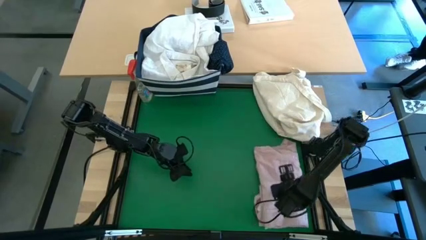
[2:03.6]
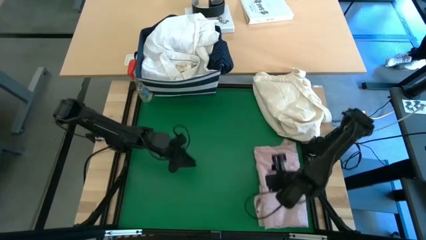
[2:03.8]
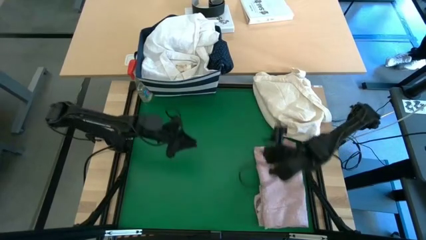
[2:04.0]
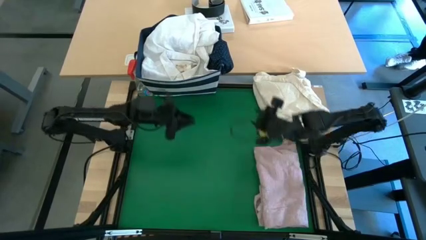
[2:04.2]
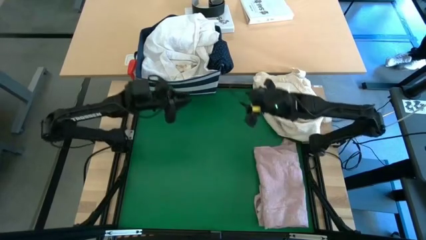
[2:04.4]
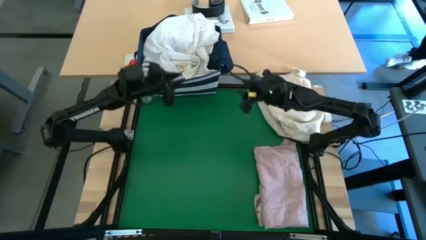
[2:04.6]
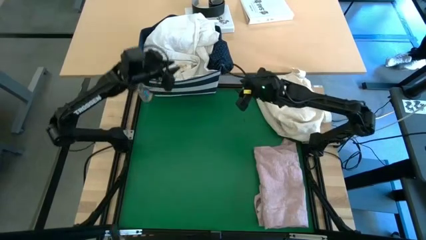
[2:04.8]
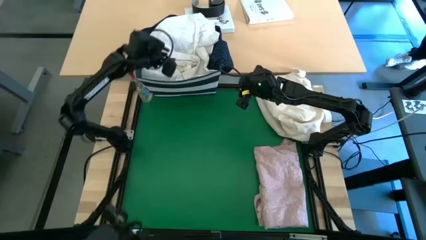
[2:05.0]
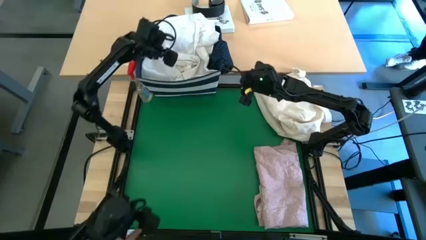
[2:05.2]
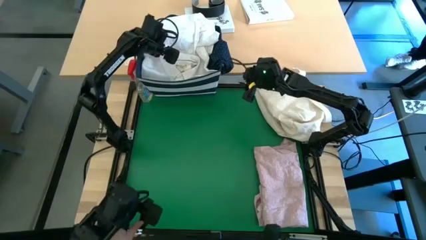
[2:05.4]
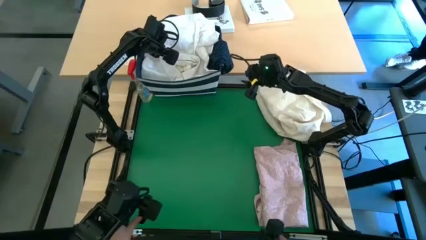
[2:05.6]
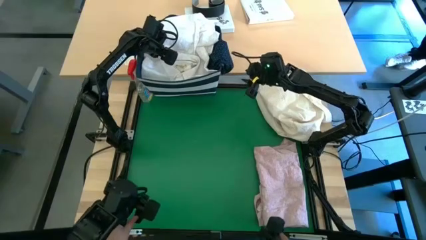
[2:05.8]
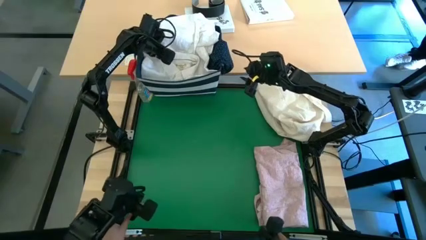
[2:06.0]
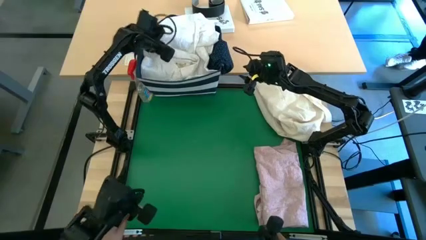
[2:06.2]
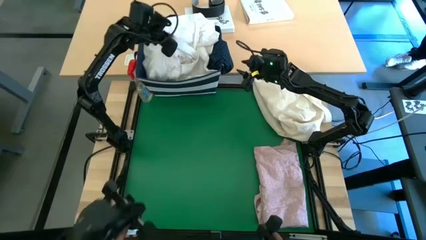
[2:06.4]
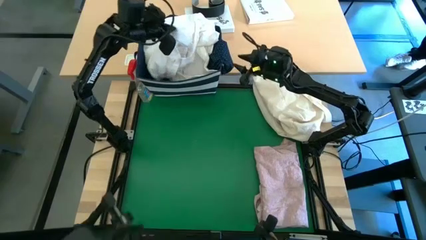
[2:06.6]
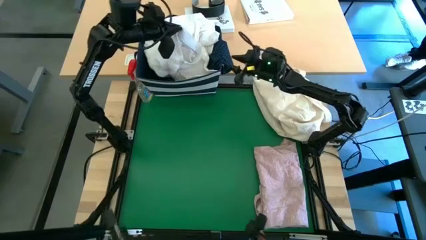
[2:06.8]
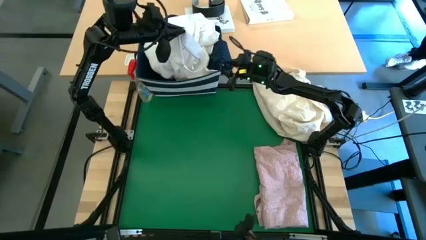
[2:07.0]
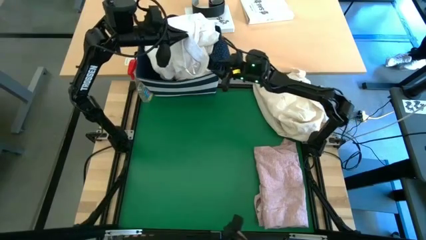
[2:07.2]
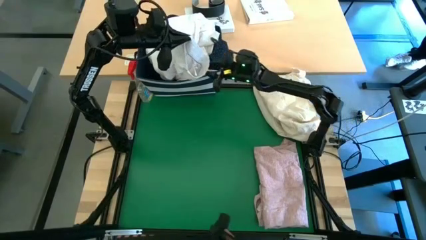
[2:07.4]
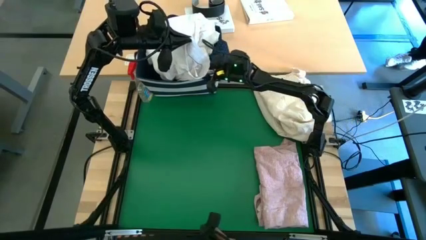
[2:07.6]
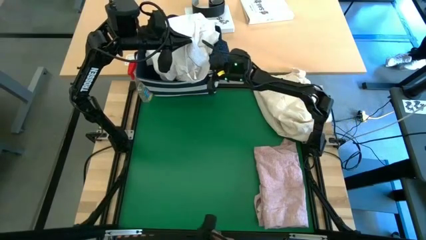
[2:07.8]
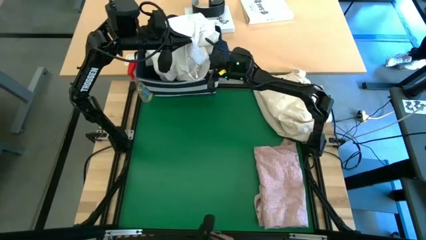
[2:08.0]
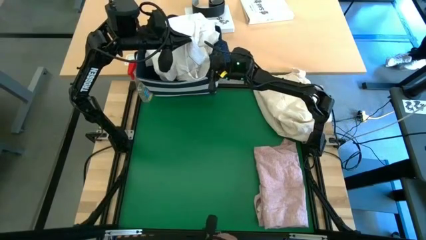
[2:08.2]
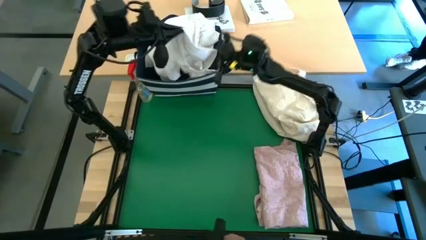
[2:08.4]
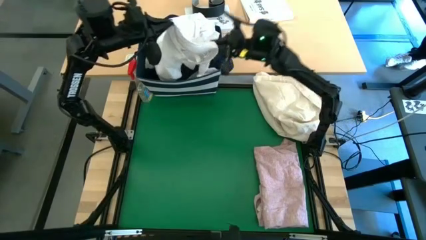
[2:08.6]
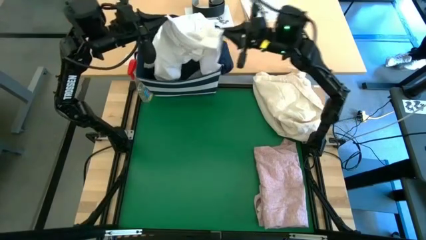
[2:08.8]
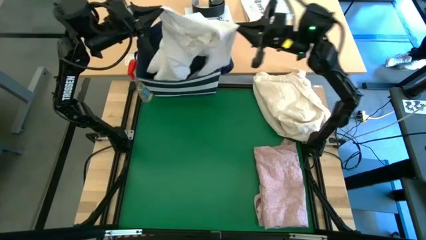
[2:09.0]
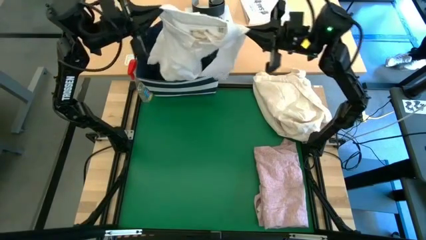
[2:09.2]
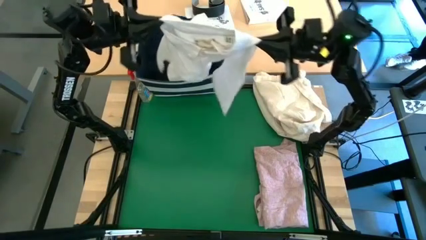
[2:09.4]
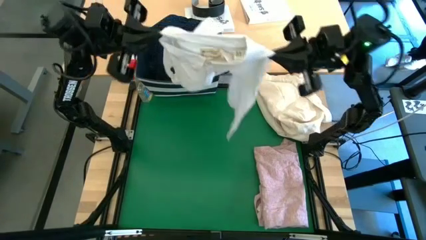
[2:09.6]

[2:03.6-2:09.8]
Task: Fold laundry
Remove the white polo shirt from the blue laundry bin

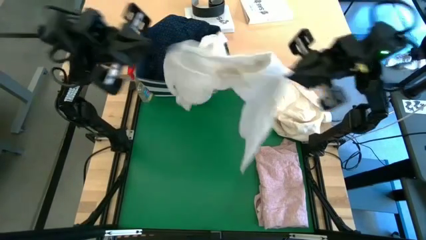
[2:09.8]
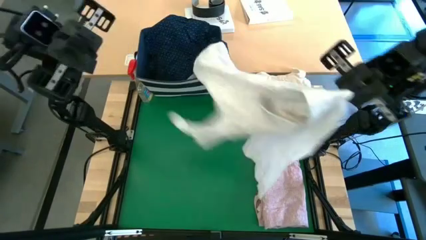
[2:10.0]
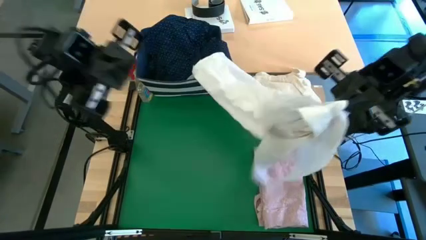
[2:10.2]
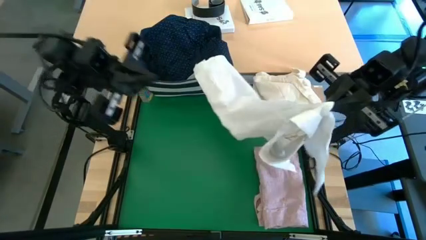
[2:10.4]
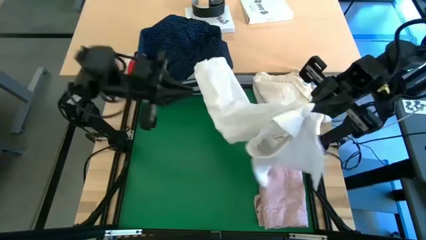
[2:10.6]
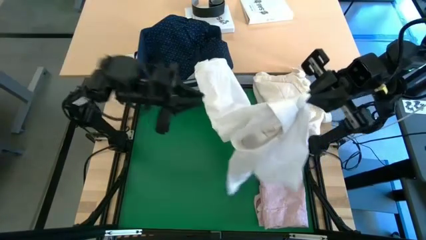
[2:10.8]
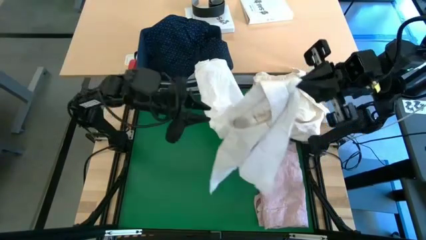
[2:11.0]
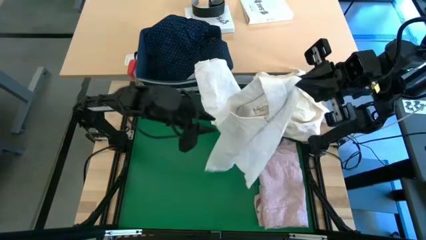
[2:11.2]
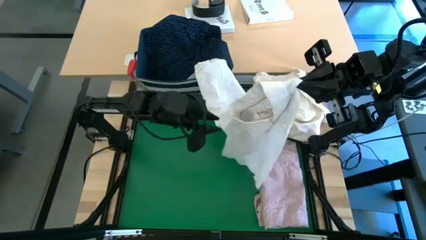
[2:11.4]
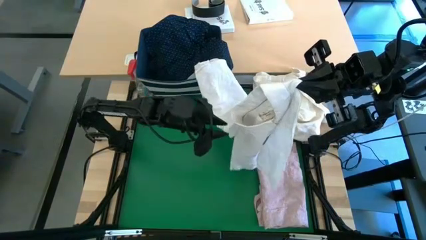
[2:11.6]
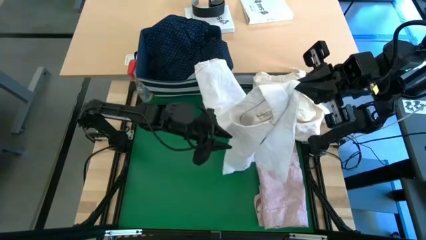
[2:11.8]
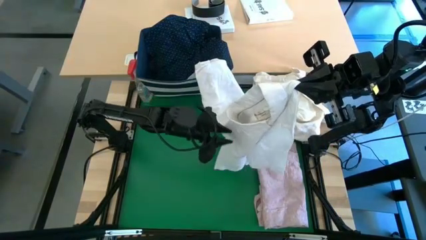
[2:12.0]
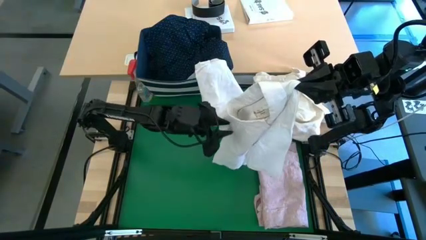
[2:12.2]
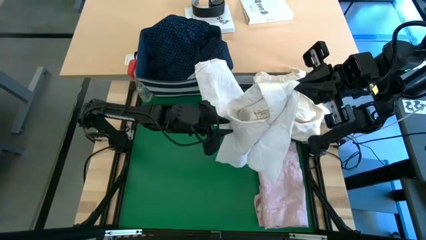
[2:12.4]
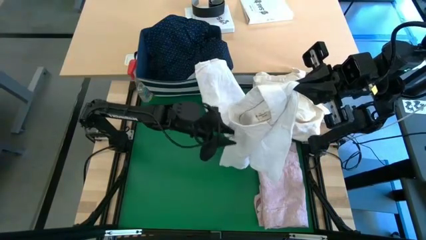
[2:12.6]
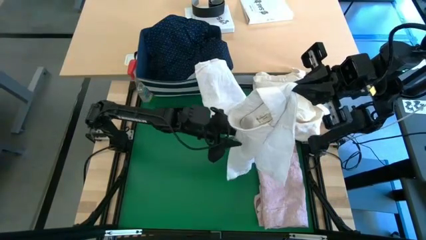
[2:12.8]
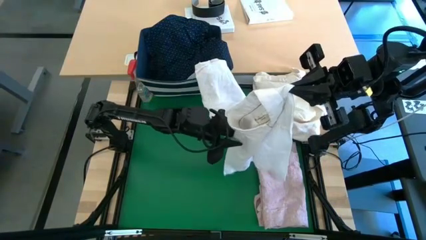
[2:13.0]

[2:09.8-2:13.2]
Remove the white polo shirt from the blue laundry bin

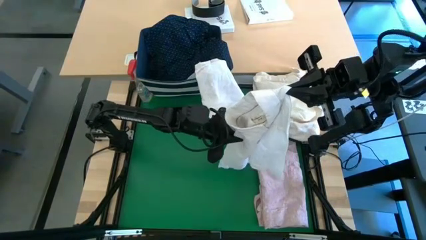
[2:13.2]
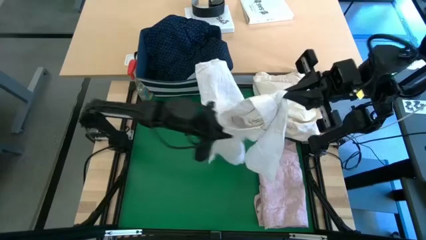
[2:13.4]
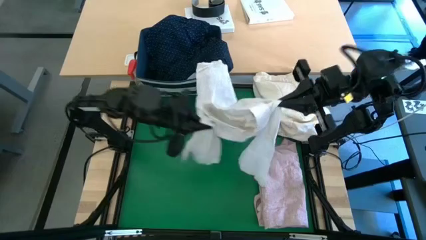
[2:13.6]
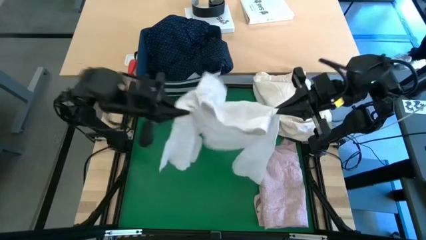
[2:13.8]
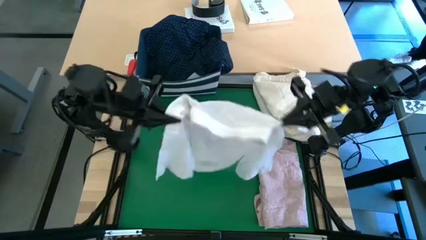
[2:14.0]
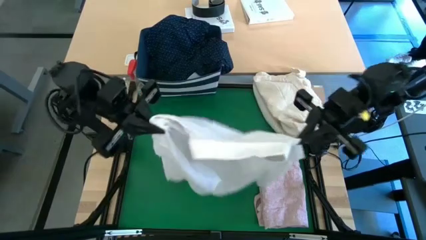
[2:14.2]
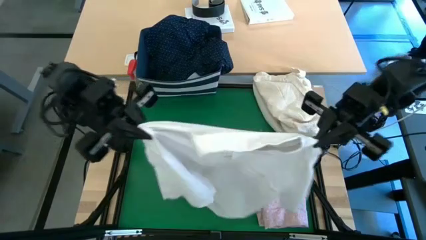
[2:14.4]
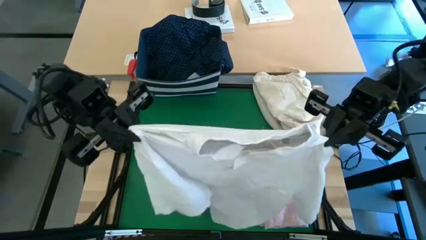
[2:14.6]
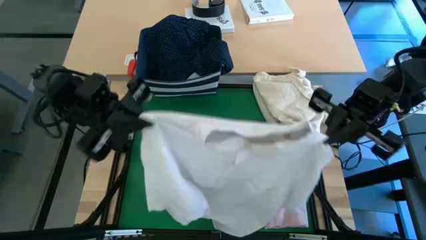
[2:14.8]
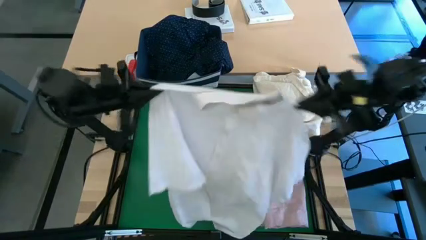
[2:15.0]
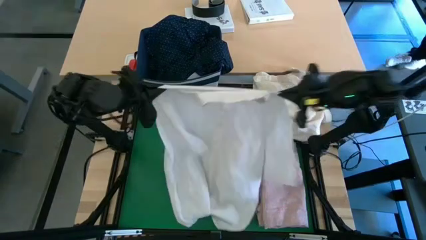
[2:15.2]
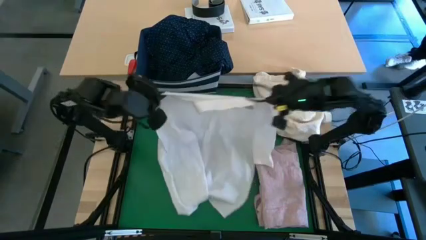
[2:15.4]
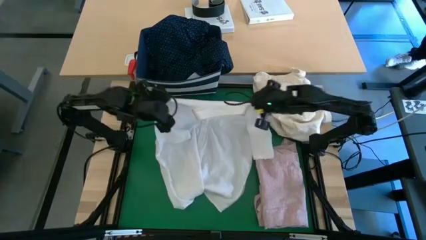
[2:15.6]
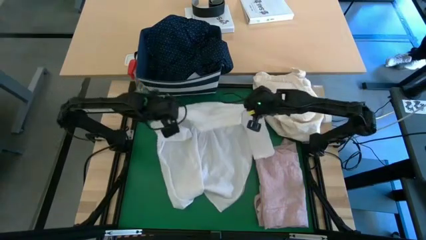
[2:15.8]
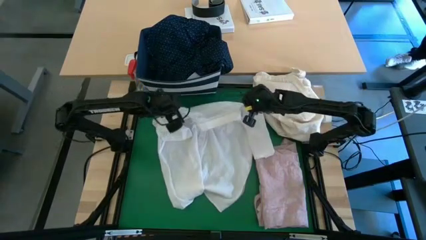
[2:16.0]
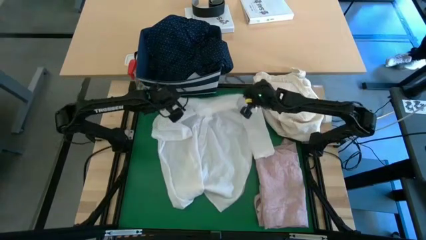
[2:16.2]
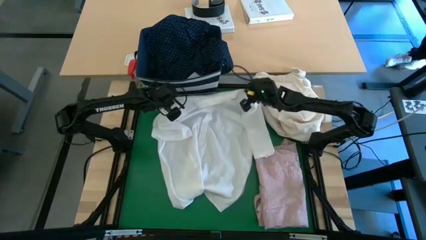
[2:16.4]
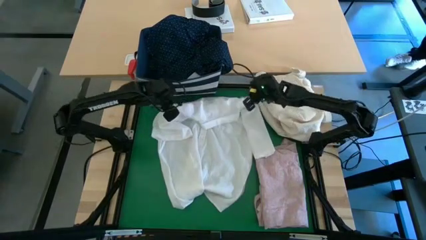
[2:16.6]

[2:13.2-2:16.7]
Remove the white polo shirt from the blue laundry bin

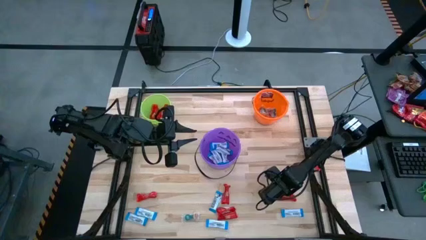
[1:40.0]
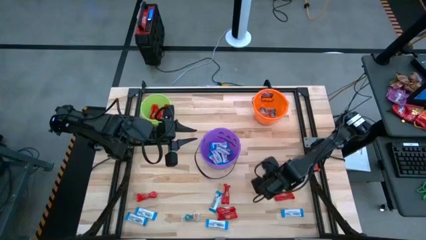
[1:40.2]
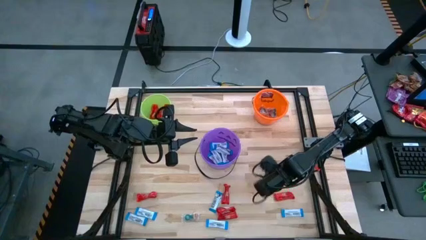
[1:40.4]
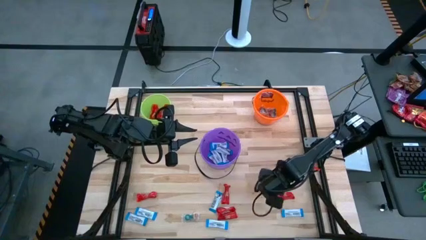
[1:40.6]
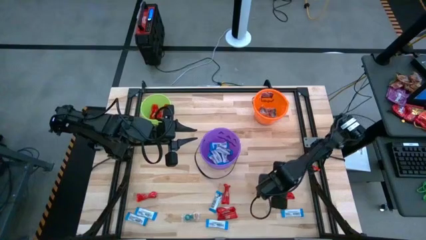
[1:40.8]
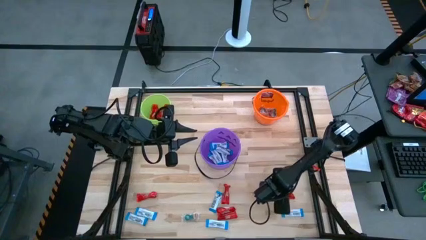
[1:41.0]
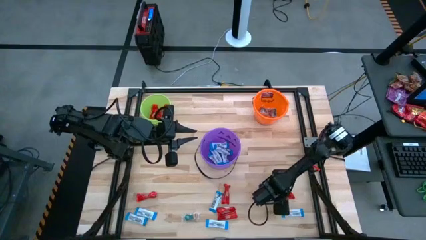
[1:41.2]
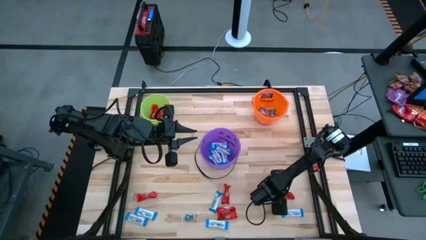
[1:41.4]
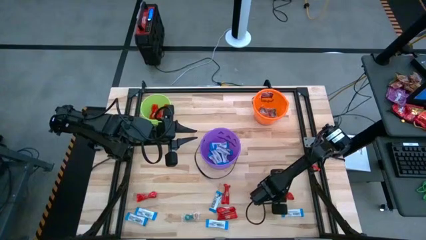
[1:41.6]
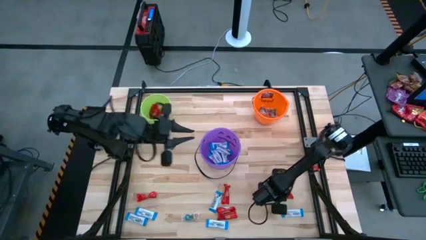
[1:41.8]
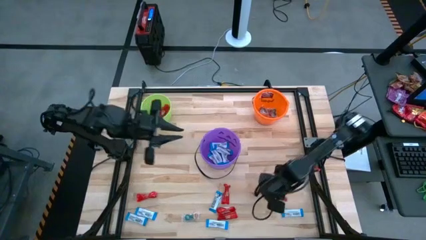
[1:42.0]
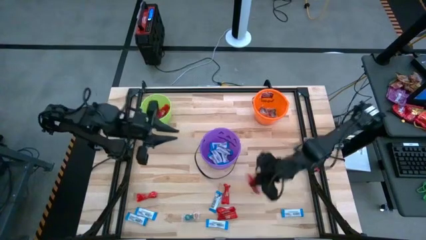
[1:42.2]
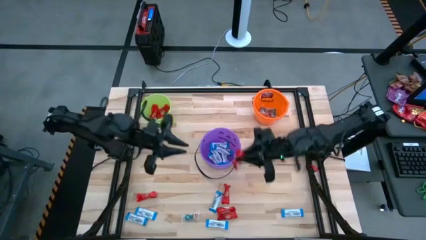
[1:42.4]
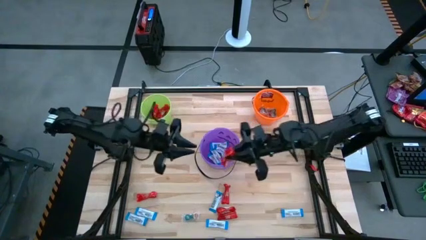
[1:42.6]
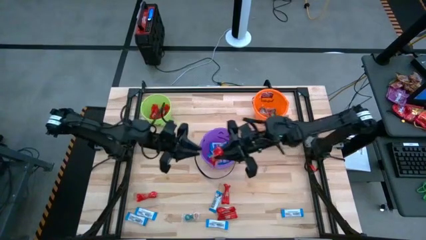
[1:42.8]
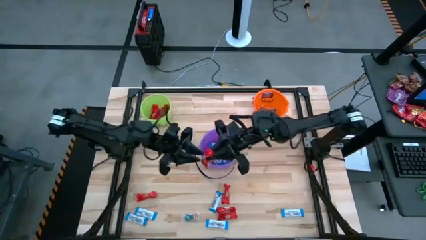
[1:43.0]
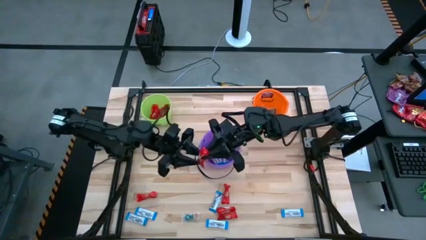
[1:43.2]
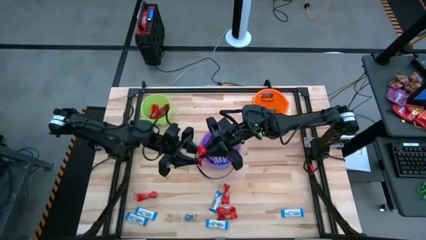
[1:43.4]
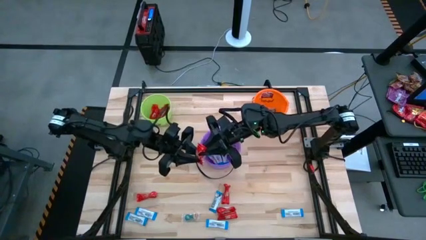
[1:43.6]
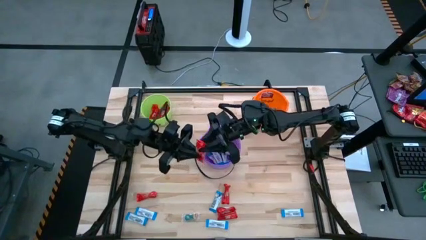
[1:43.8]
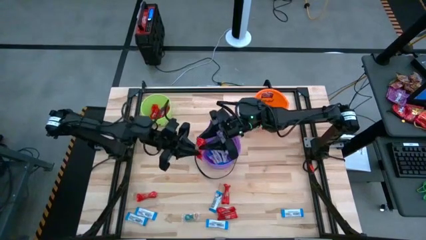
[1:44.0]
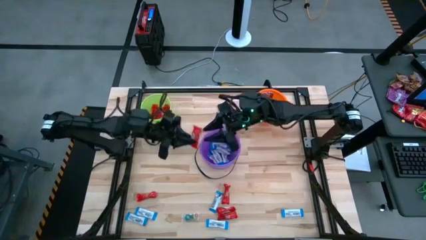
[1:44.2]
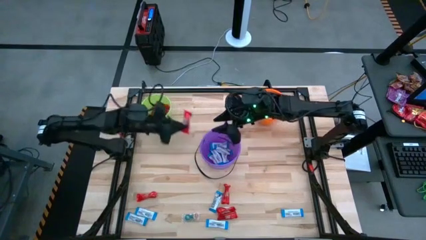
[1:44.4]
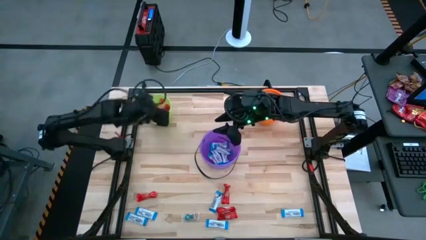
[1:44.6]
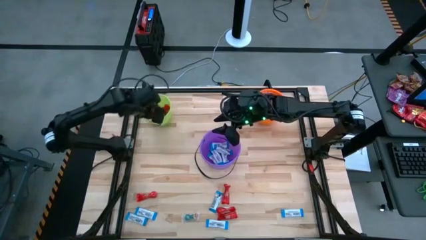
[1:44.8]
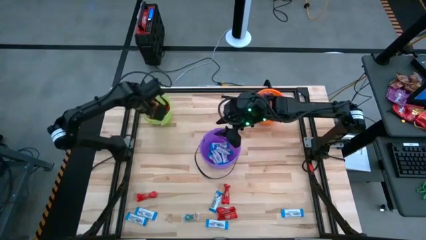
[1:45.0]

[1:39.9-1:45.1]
Task: Sort candy by brand, put in halloween buckets
Put the red chocolate into the green bucket
